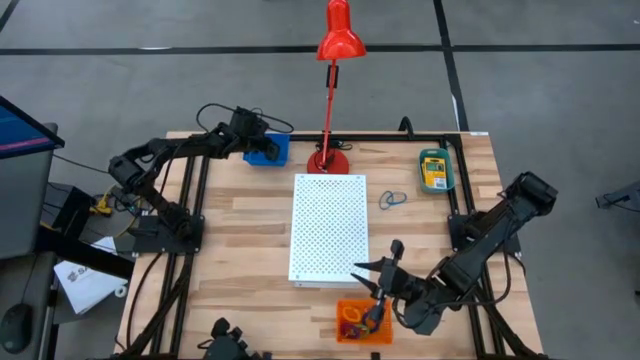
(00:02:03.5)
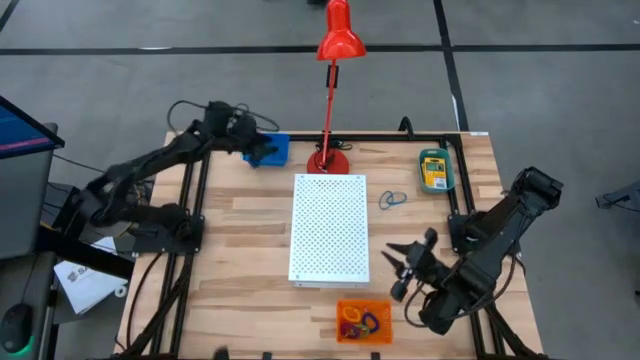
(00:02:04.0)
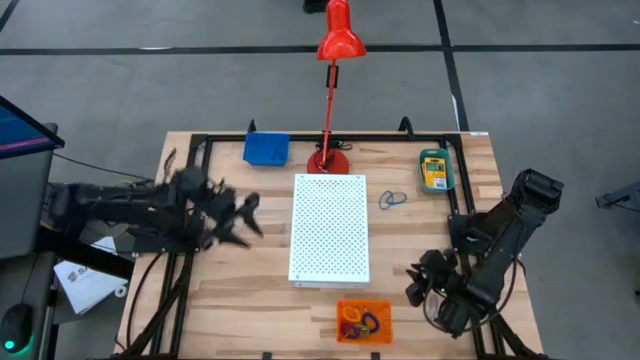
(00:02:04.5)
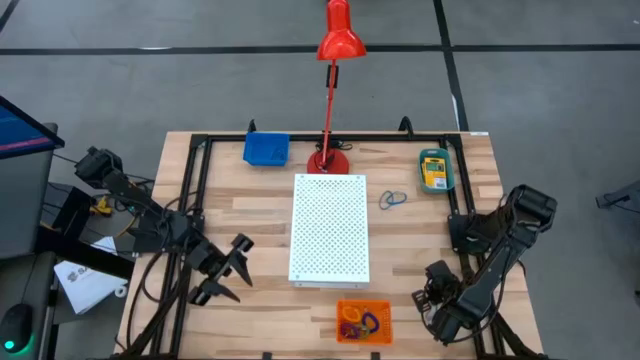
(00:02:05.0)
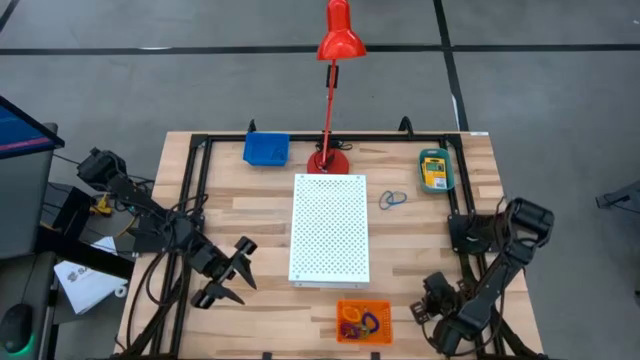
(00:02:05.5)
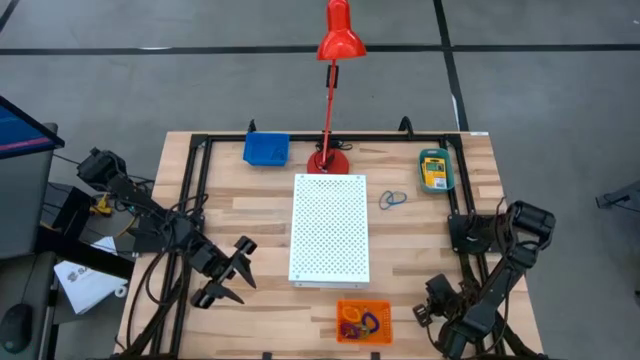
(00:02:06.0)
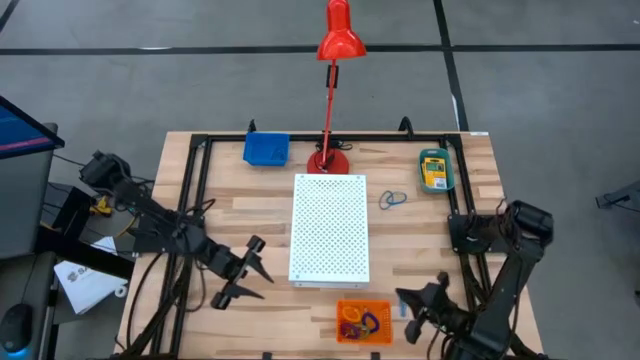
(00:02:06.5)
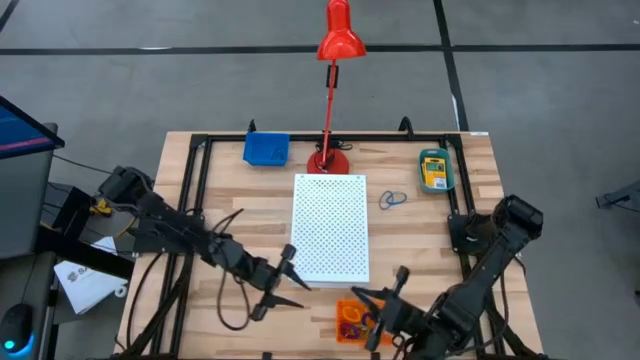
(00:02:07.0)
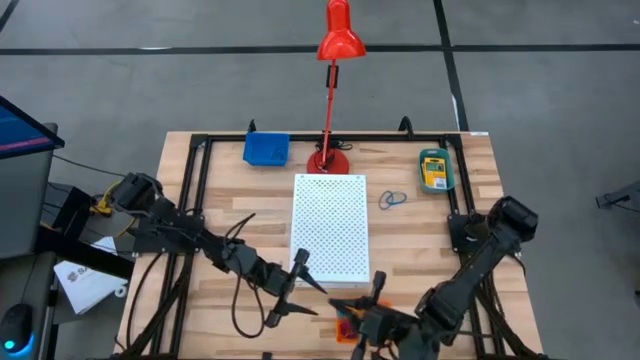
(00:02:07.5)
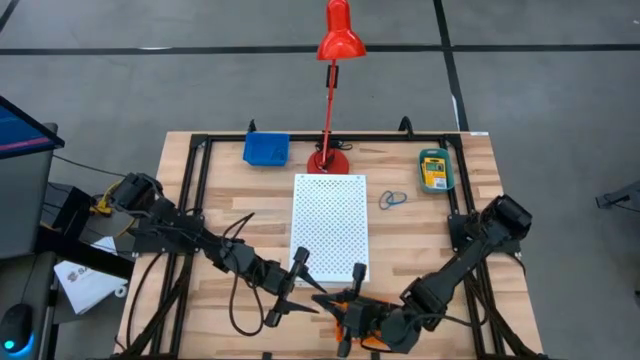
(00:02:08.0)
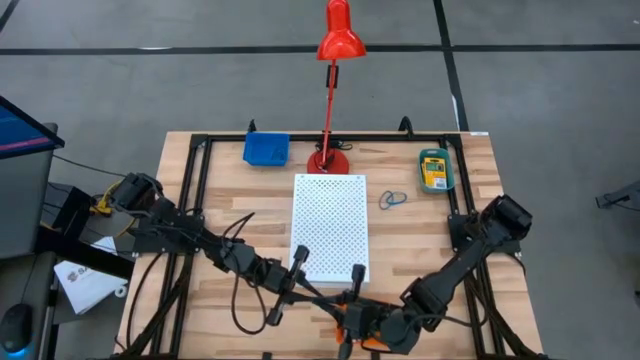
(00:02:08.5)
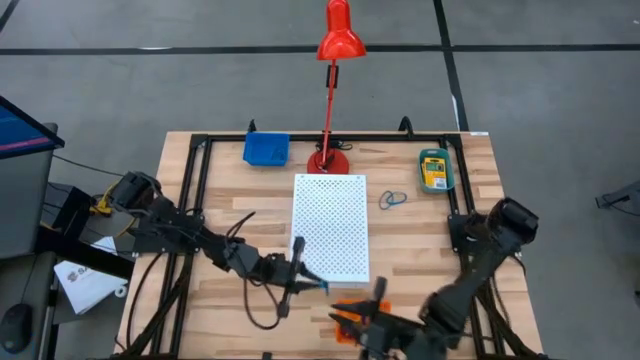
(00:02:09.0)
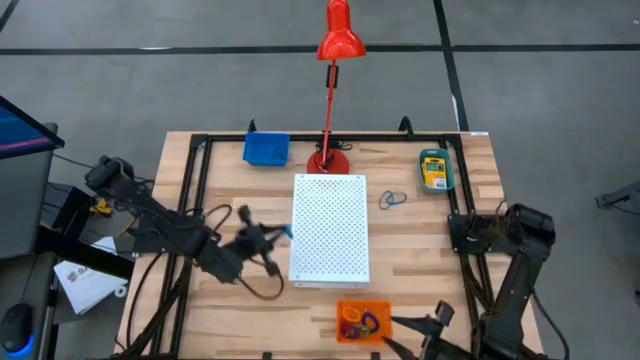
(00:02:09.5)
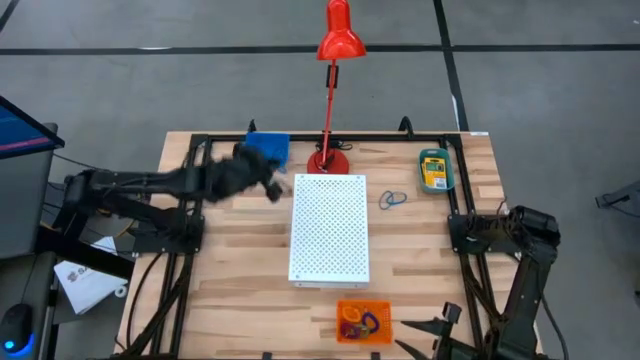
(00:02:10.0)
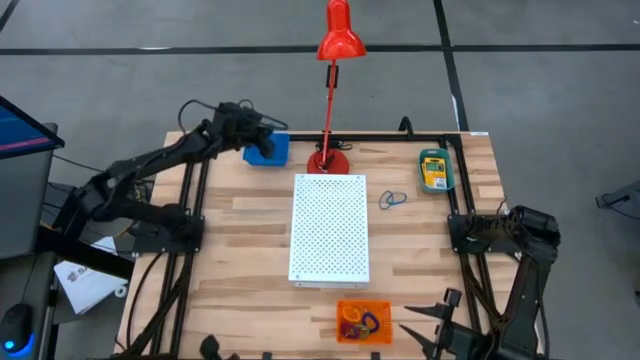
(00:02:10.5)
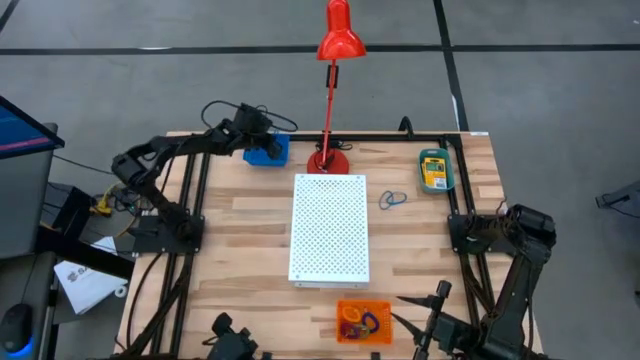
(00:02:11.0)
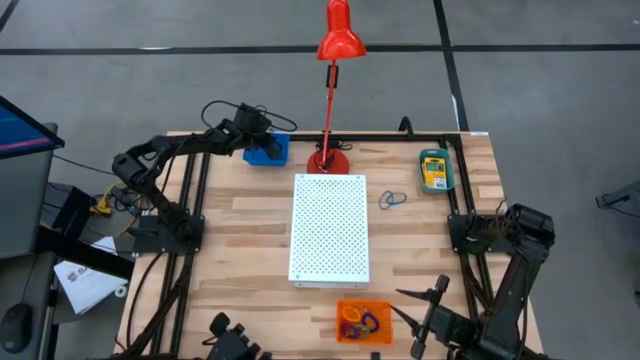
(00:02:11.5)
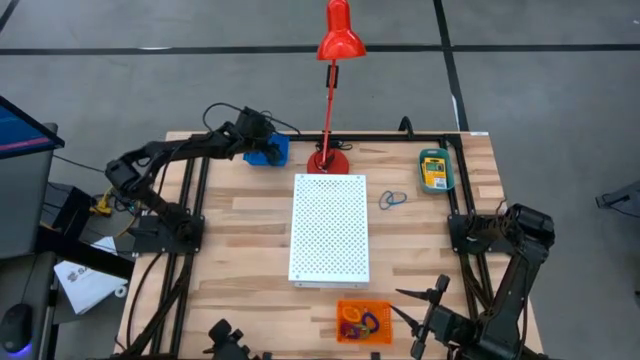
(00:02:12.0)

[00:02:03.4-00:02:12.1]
Task: Pick & Place Office Desk Supplies
Put the blue rubber band into the blue bin

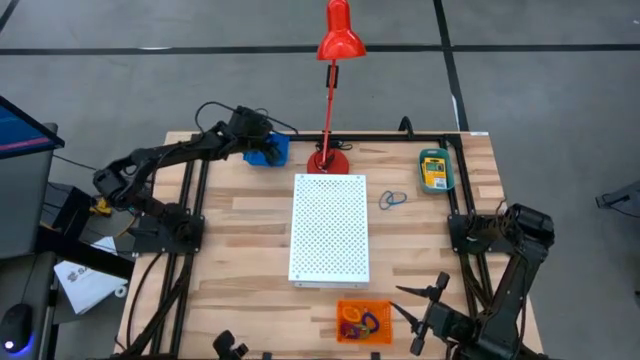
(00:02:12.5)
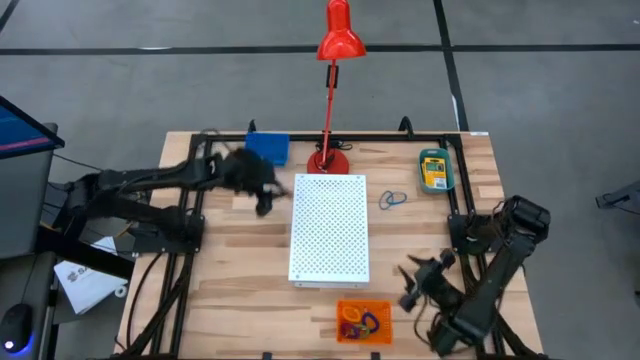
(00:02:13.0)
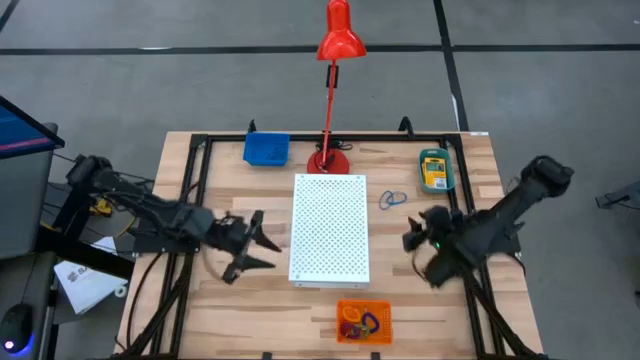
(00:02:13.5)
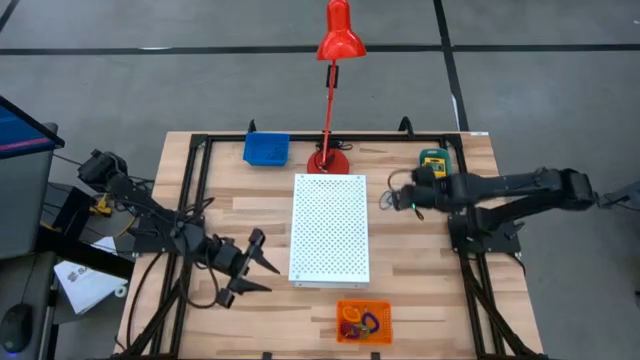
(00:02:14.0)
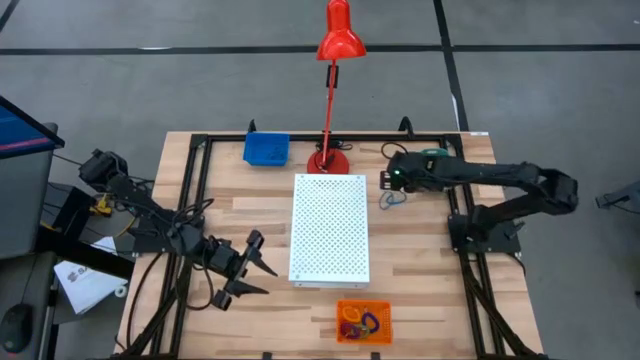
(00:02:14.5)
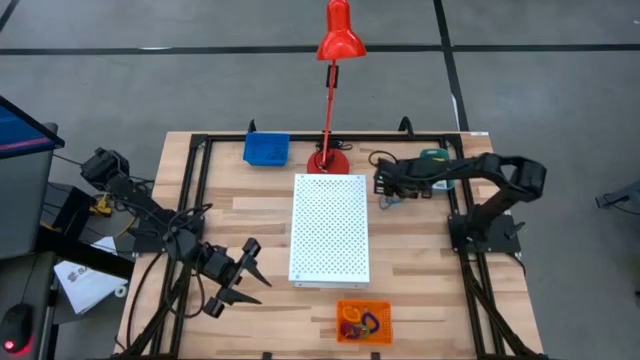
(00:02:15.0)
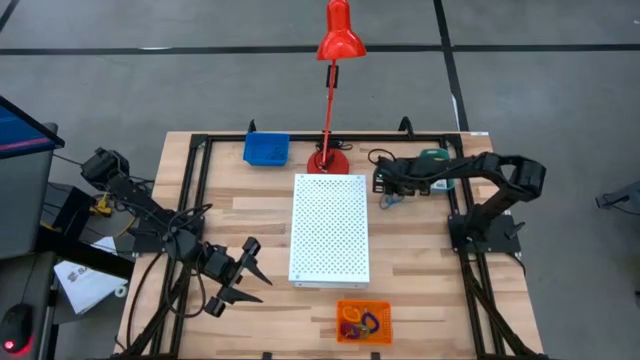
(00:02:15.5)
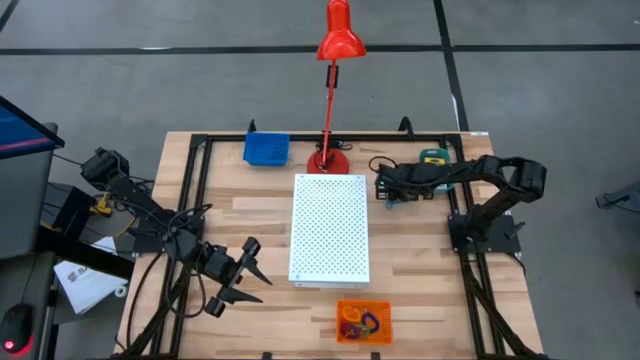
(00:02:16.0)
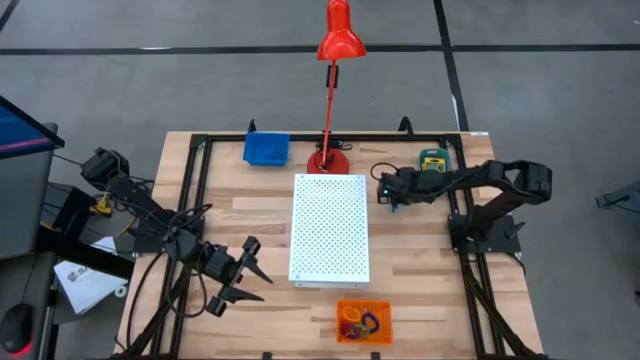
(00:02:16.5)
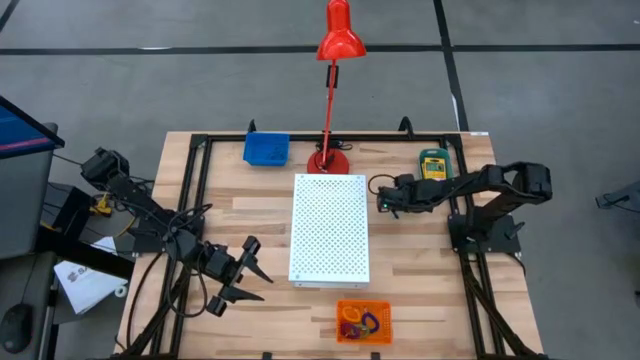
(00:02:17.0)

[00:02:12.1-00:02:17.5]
Put the blue rubber band into the blue bin

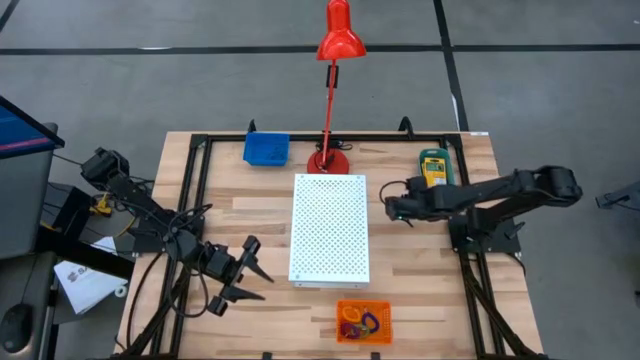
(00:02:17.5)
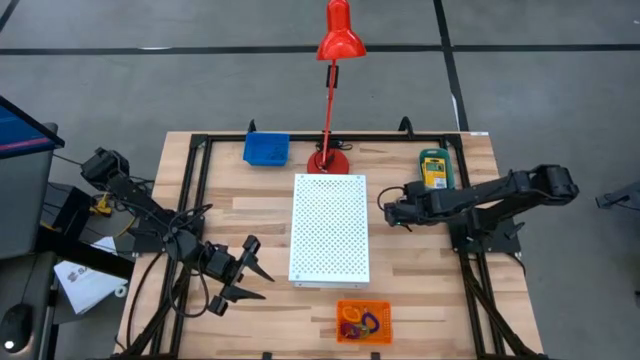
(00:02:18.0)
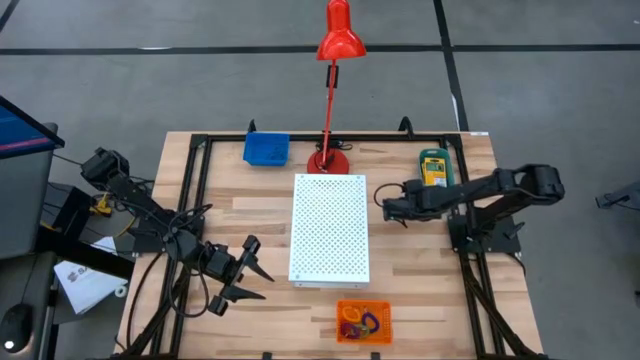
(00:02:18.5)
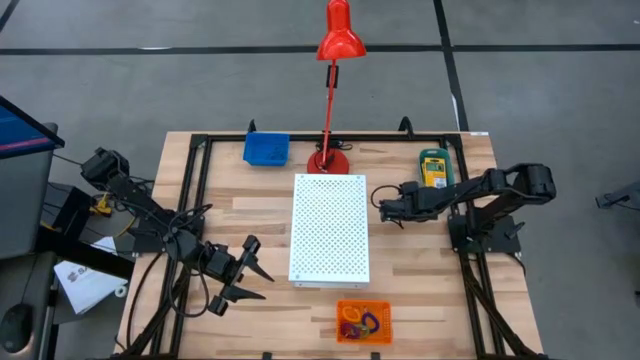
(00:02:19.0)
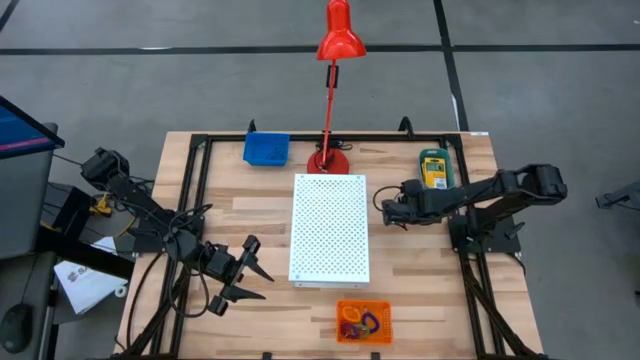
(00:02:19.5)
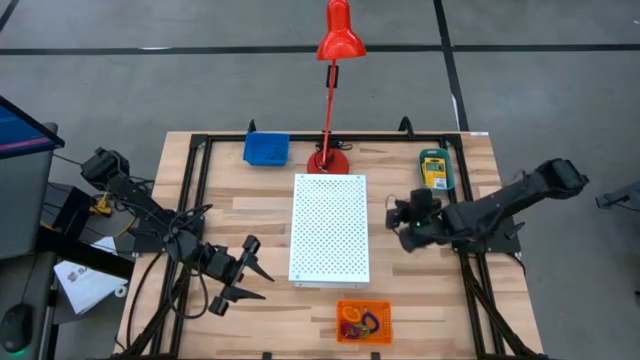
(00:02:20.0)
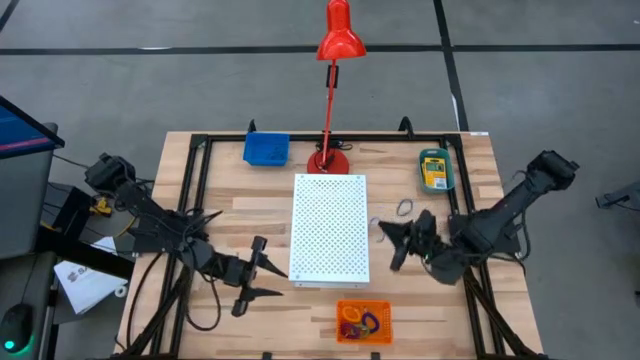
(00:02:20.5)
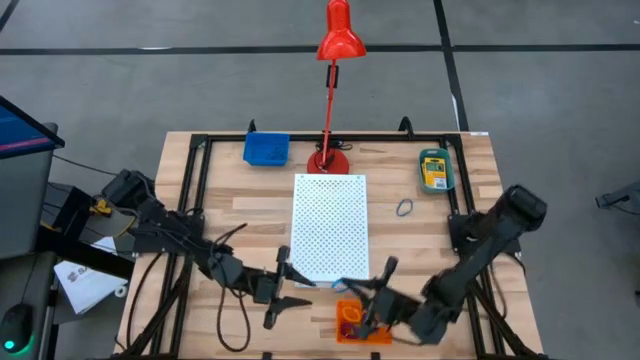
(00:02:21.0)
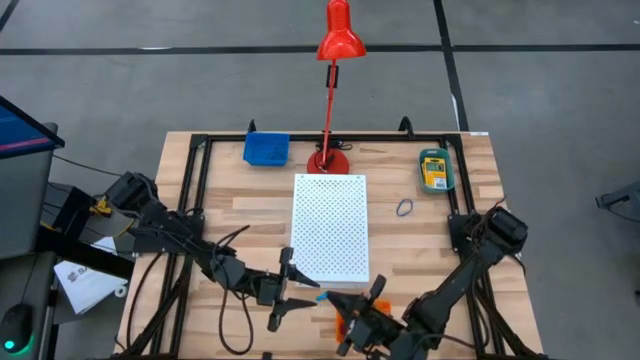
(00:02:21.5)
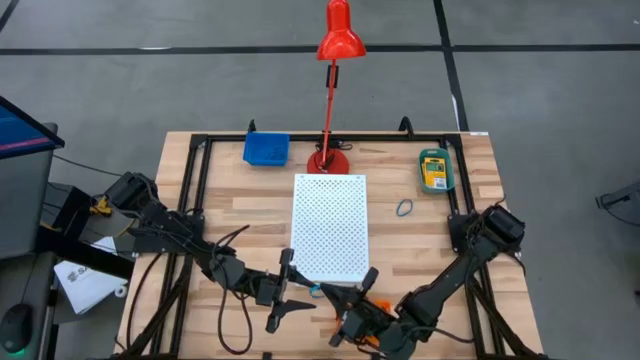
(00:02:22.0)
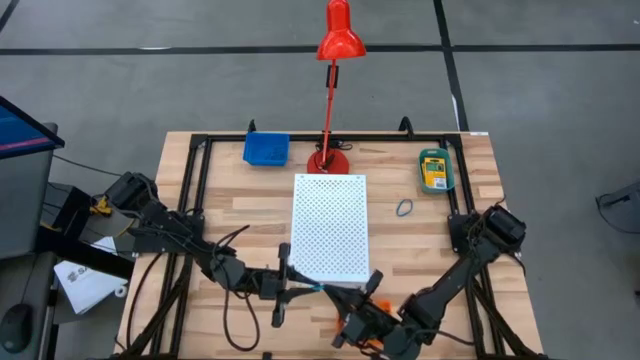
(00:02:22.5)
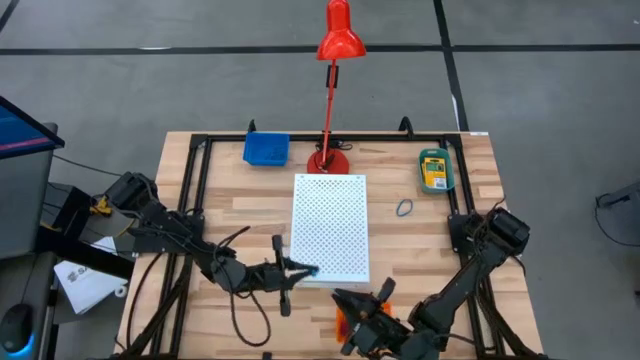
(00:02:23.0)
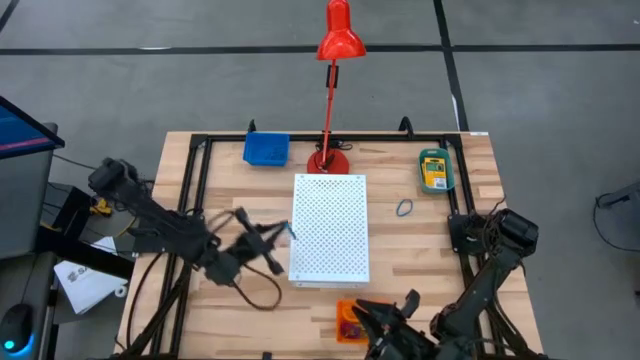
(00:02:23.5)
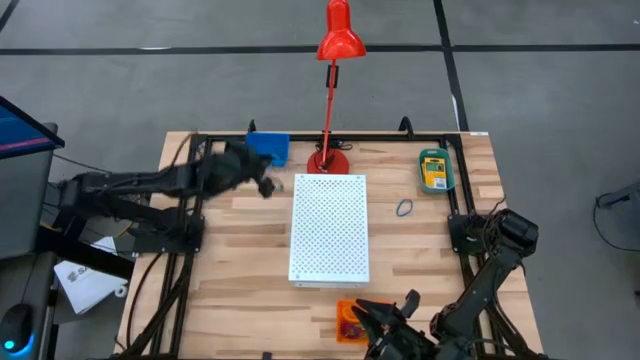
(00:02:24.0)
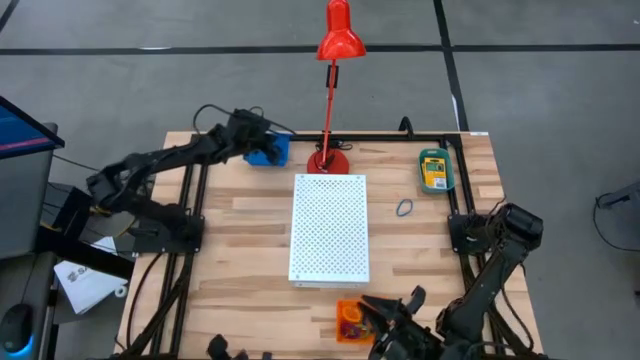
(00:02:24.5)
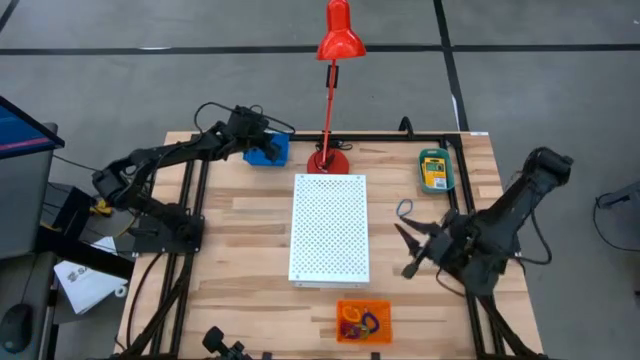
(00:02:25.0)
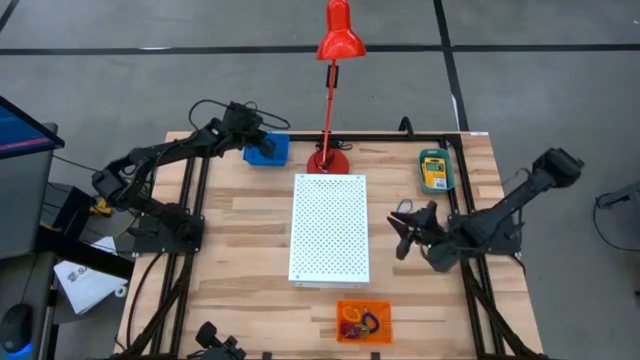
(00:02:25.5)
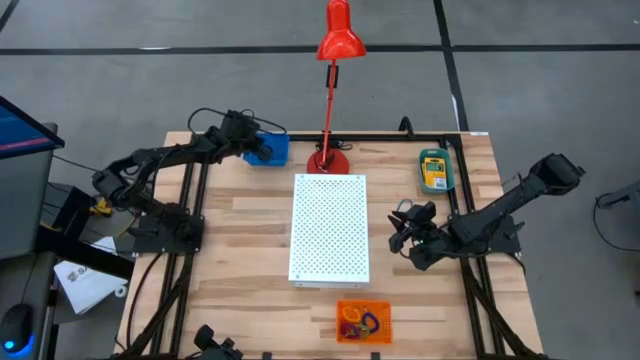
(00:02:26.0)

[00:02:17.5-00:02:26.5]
Put the blue rubber band into the blue bin
